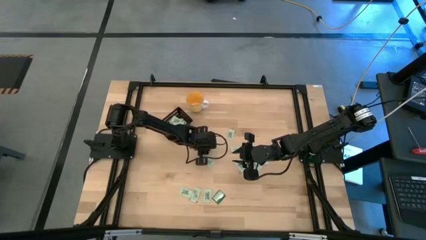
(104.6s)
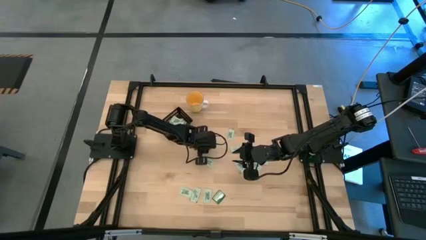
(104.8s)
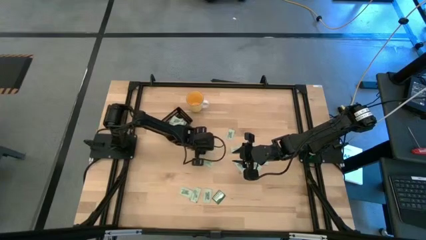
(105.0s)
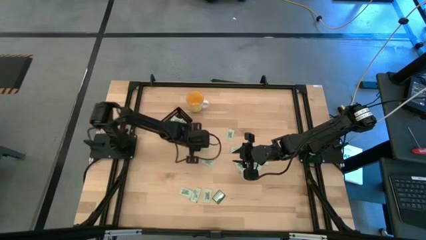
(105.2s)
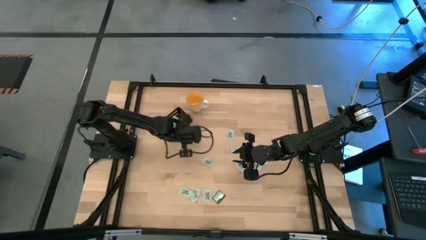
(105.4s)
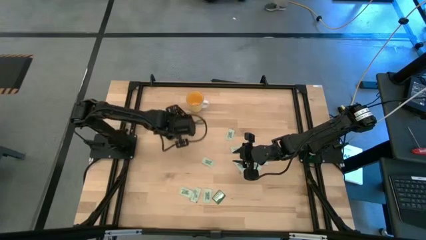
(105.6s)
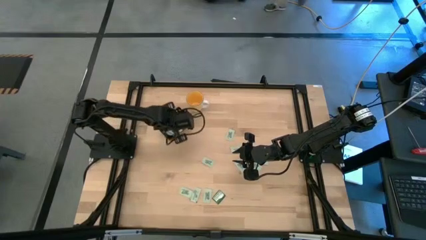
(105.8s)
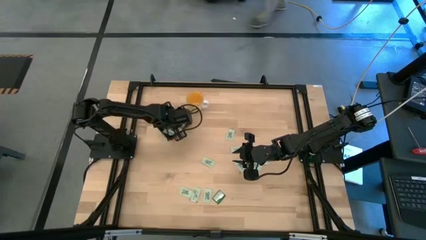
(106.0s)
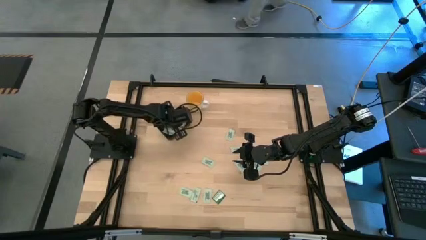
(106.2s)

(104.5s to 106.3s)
Task: Pick and place Stevia / Truvia into bins
Put the green stevia packet into the black bin

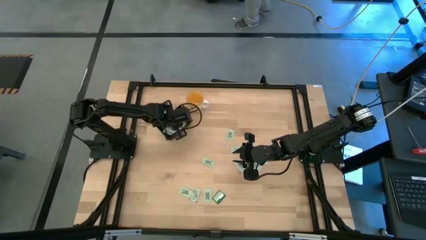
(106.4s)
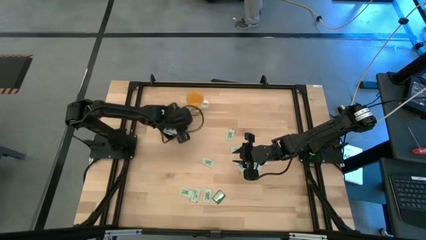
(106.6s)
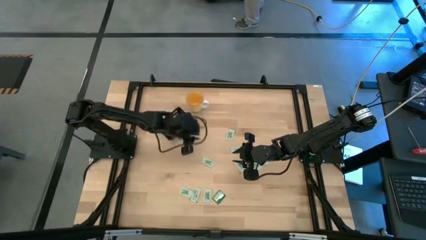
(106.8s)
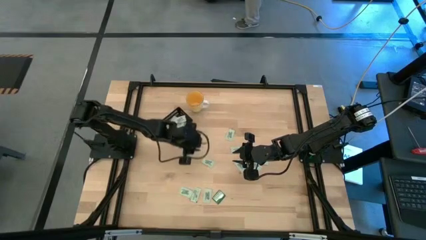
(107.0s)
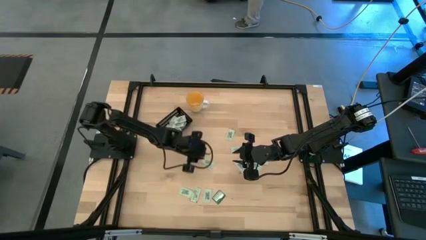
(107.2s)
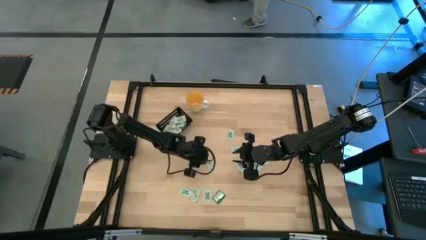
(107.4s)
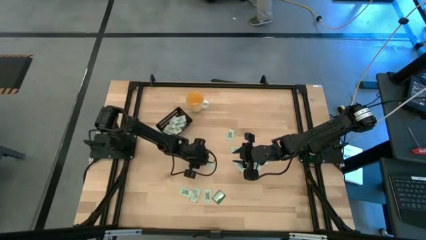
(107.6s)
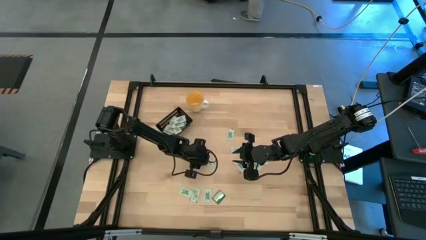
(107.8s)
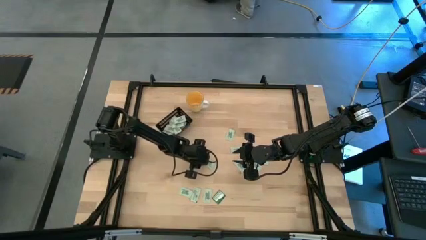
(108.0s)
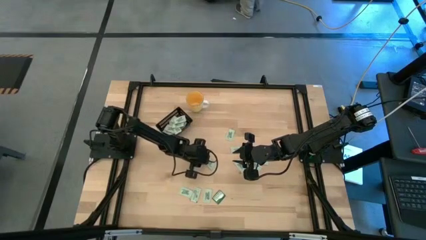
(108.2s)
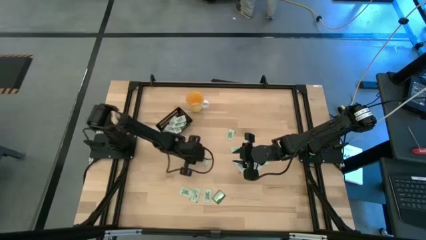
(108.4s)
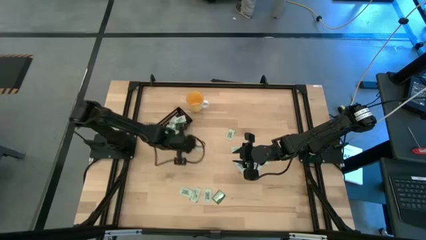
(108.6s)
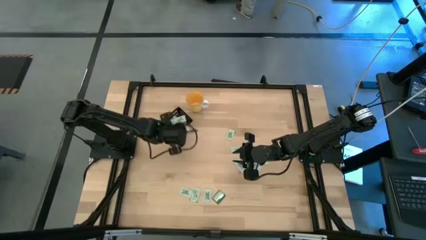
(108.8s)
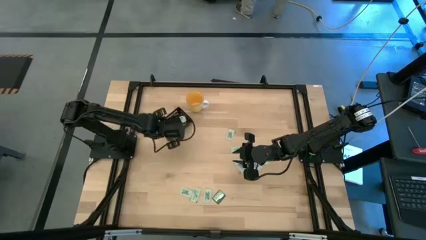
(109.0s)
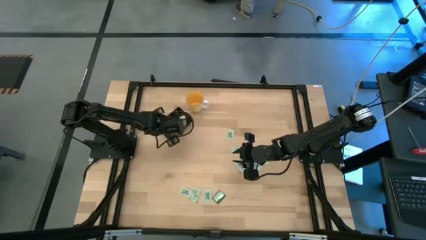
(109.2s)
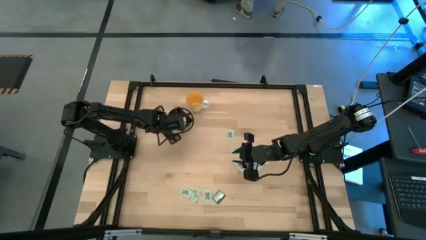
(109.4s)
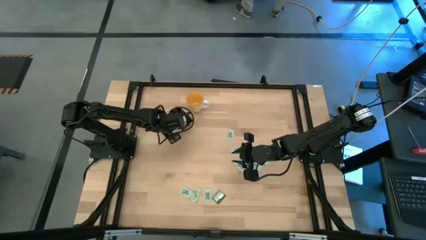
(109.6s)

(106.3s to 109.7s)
Put the green stevia packet into the black bin

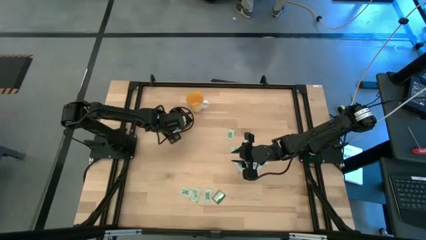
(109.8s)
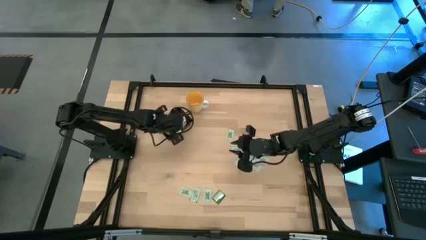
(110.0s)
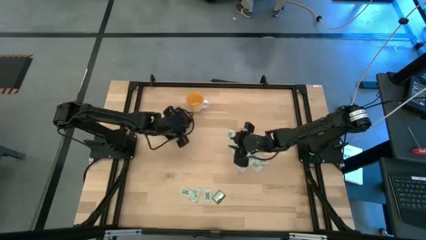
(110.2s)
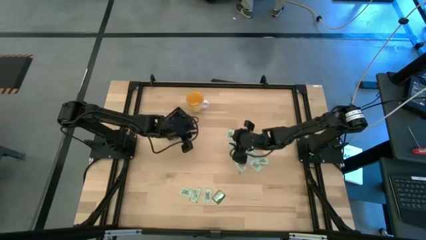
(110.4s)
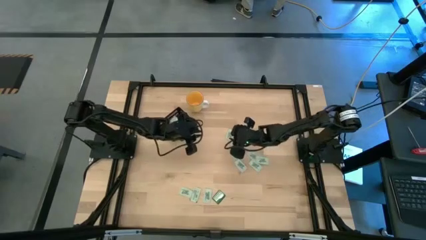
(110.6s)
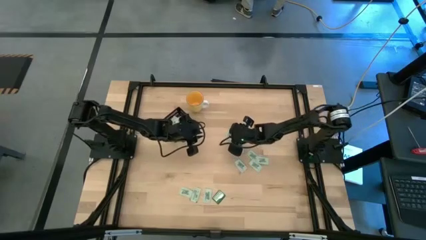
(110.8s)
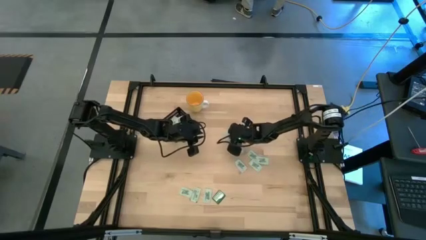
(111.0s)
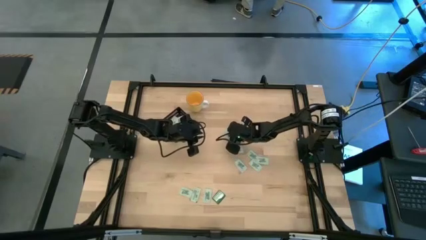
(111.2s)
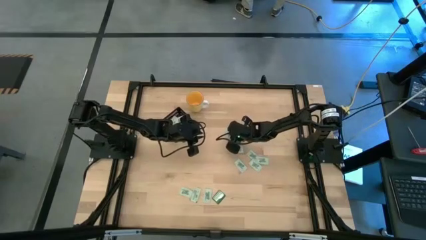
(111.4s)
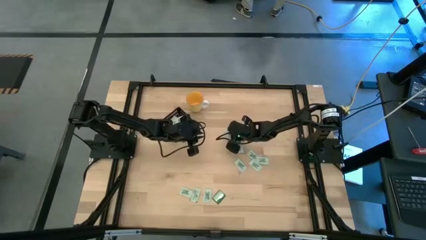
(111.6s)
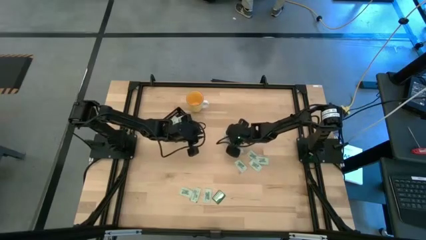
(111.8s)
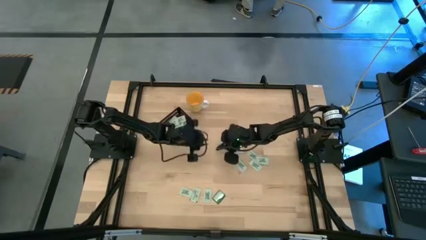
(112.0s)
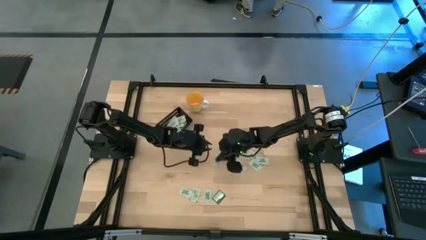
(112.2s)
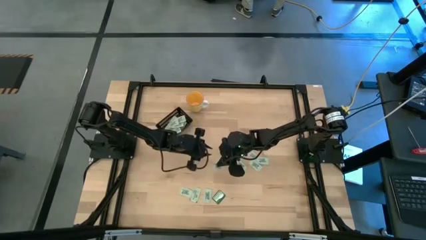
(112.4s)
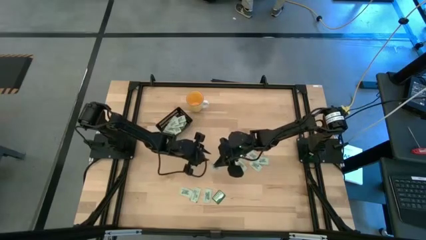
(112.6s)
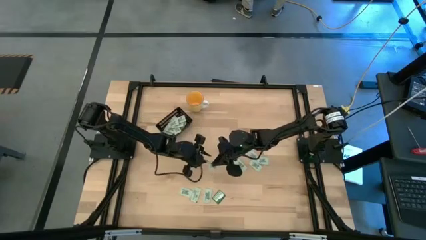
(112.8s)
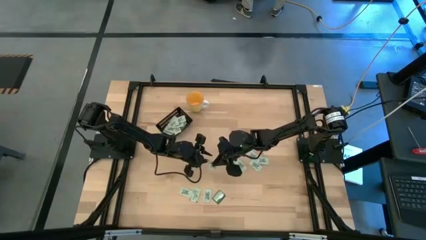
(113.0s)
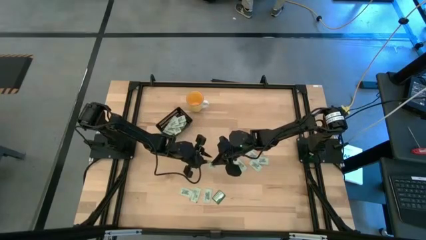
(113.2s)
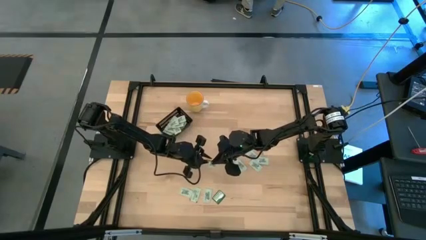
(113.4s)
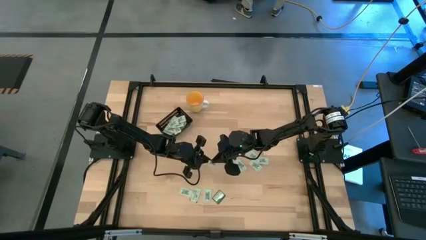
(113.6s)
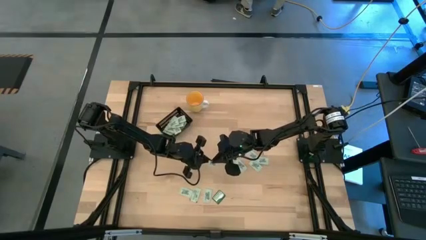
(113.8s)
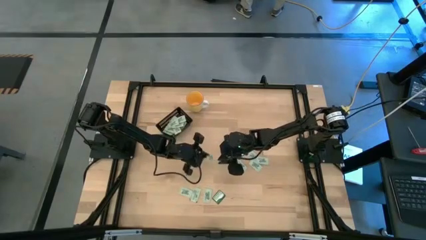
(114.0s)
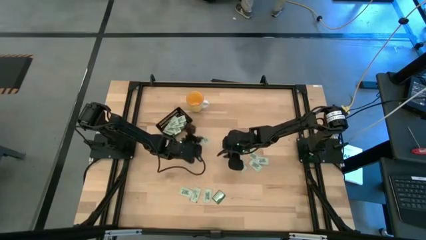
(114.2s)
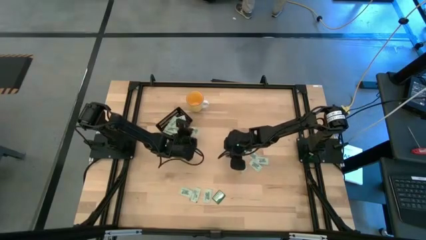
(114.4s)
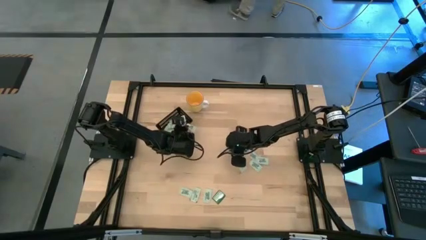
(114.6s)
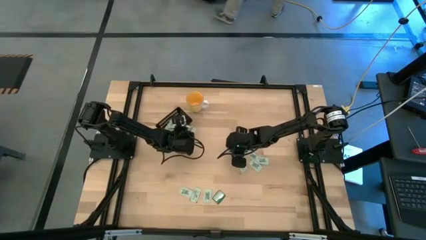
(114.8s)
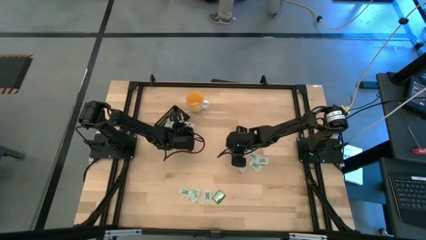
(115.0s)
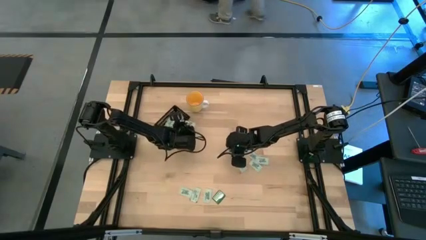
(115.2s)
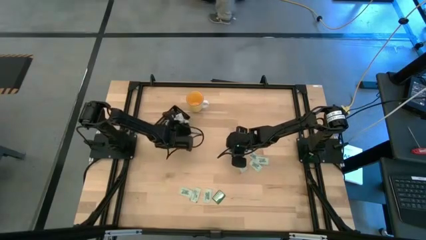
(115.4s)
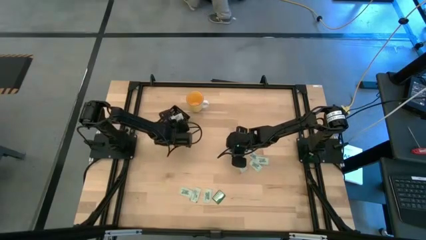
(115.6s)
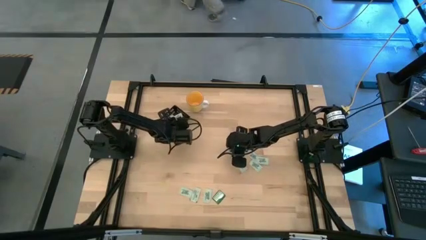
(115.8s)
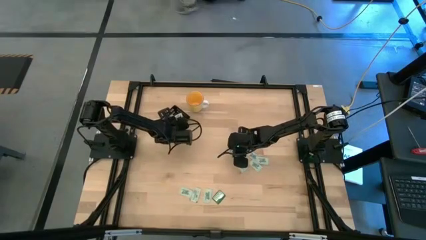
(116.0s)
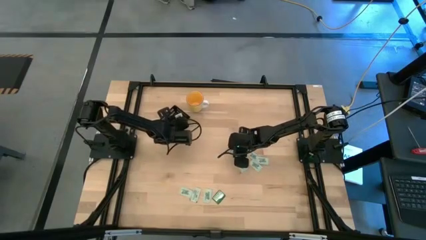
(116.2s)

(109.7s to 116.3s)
Put the green stevia packet into the black bin

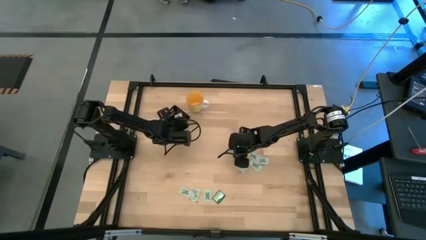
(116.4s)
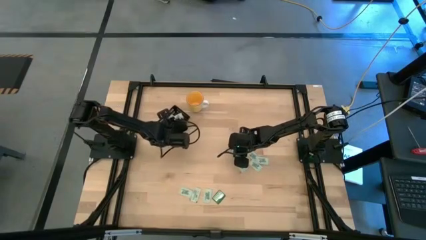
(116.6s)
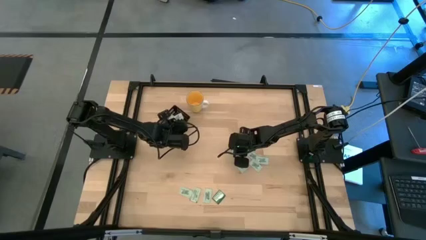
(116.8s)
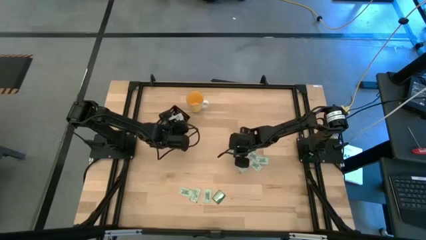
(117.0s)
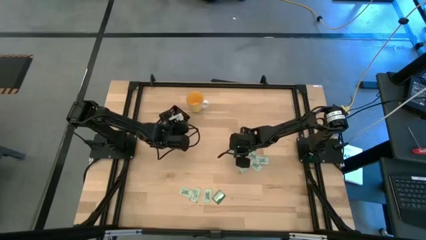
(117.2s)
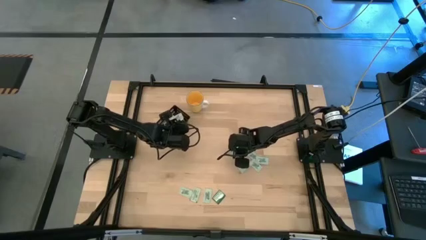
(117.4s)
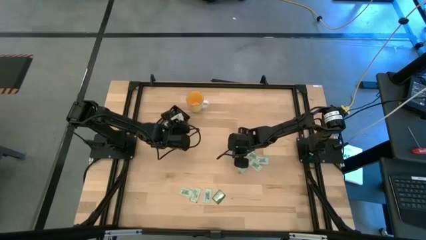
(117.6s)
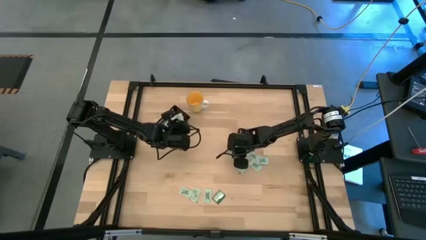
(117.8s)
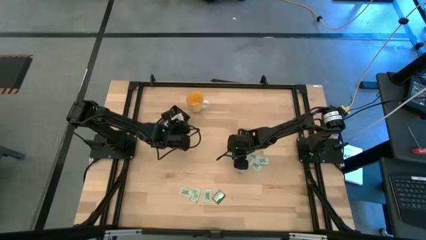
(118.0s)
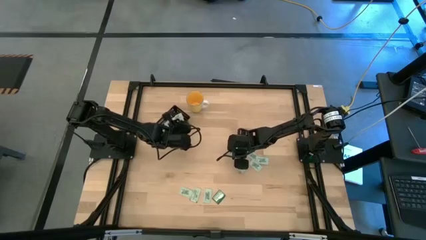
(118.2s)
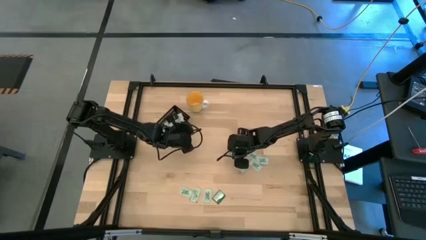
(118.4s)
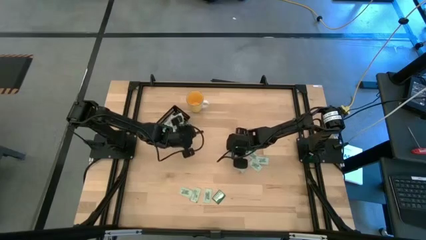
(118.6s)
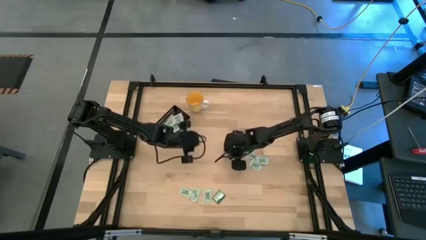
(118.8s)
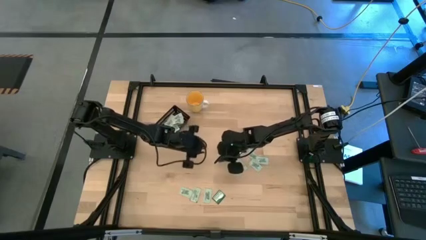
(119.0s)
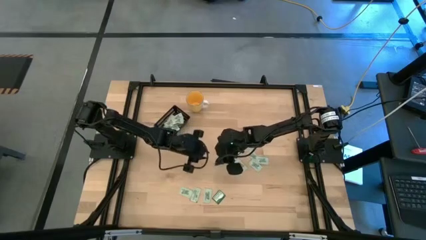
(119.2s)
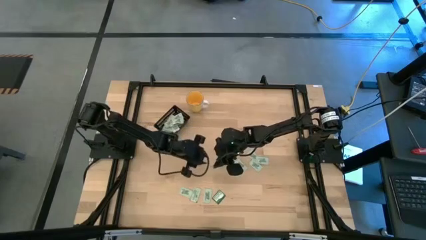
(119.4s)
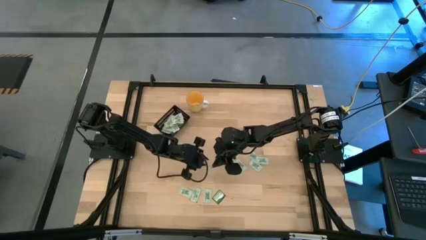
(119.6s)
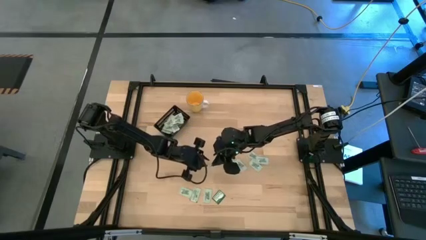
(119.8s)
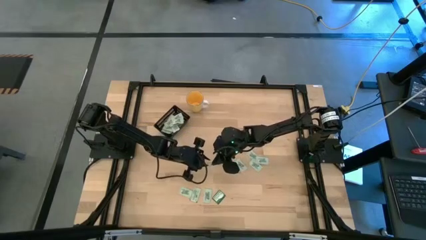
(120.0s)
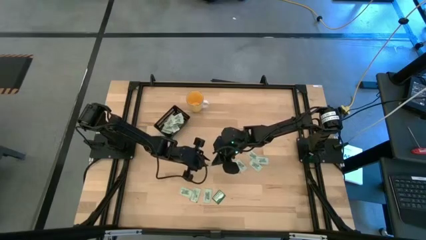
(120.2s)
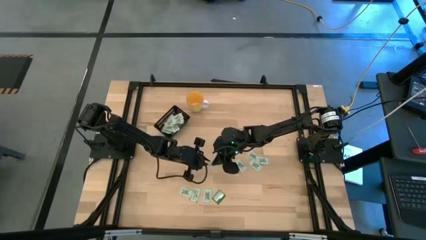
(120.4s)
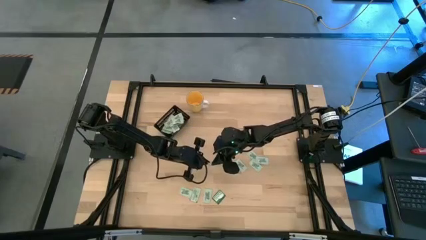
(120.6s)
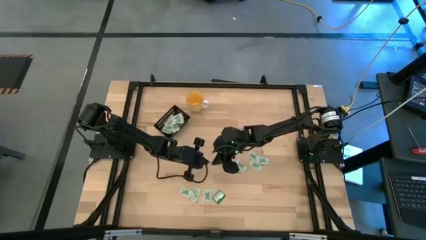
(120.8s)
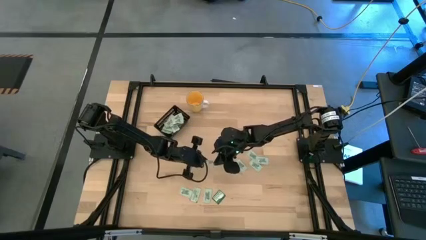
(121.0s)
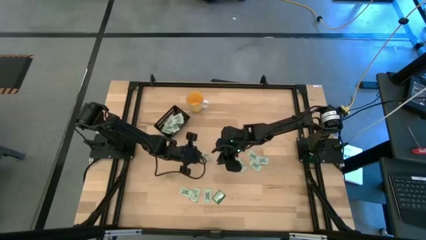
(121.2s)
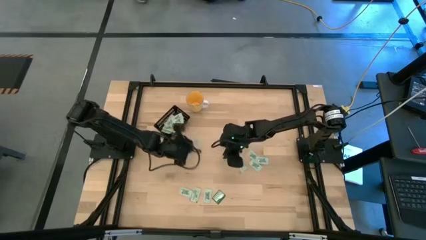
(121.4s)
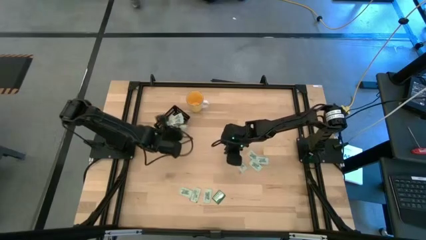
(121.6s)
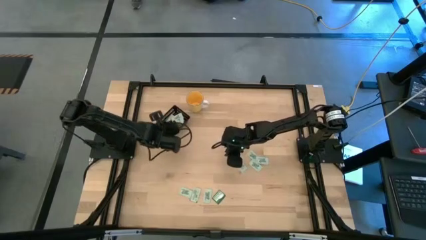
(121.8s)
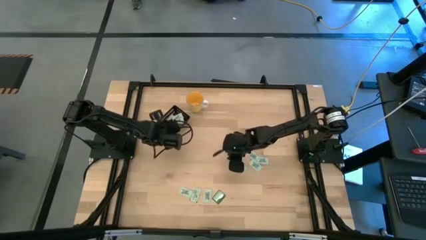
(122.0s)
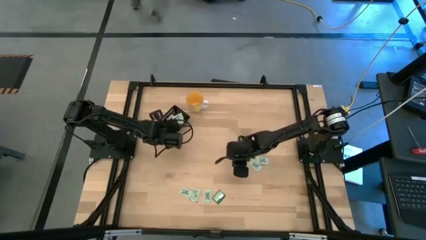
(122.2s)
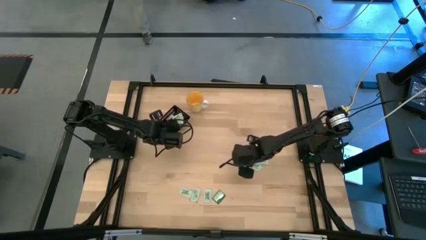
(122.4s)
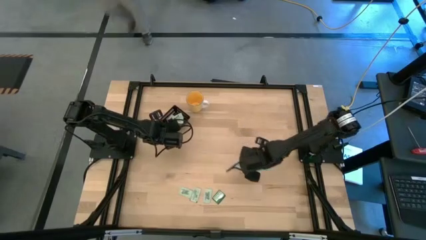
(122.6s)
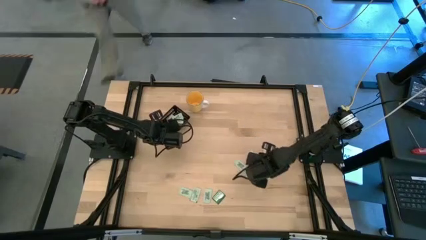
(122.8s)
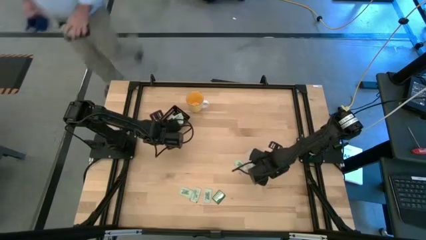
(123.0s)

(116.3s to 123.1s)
Put the green stevia packet into the black bin
